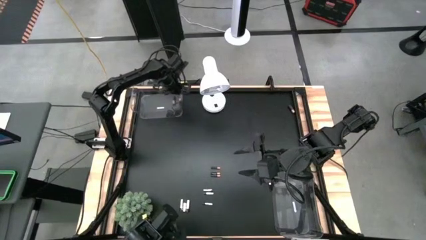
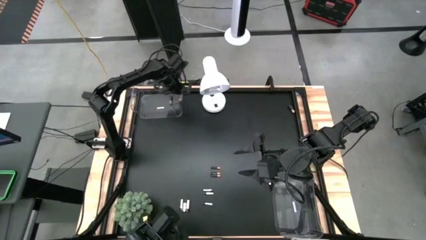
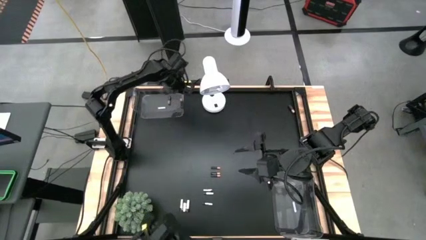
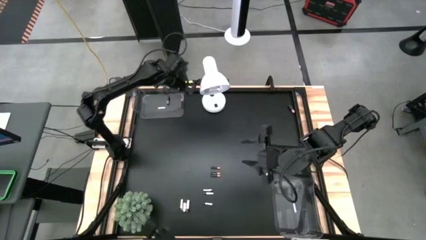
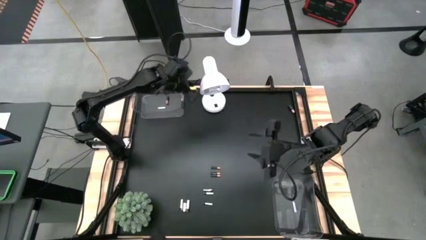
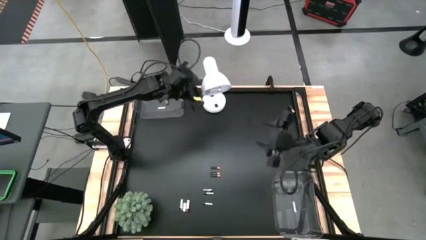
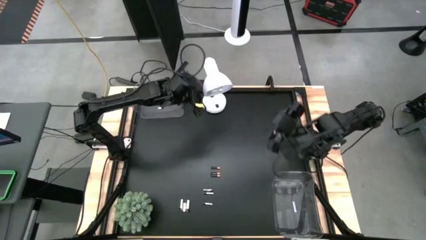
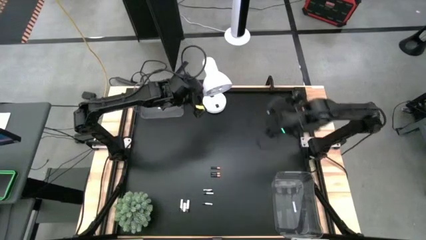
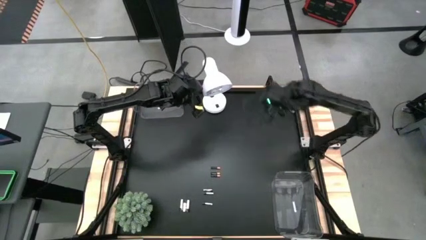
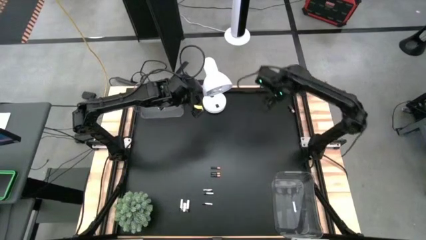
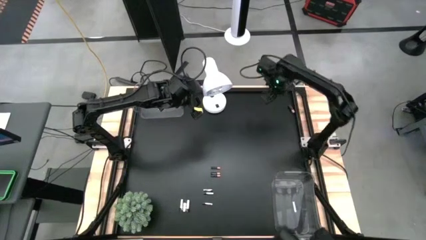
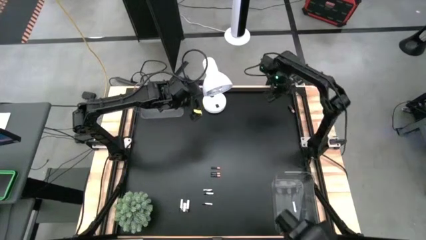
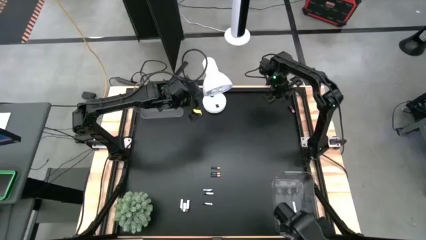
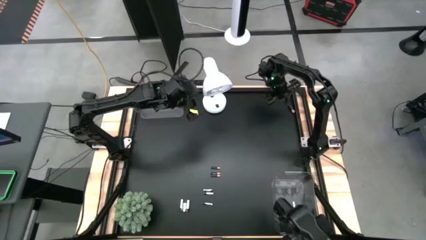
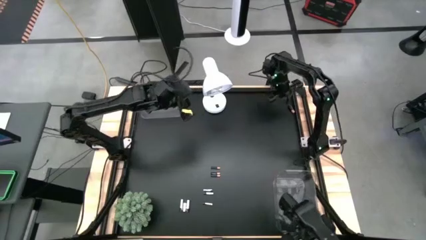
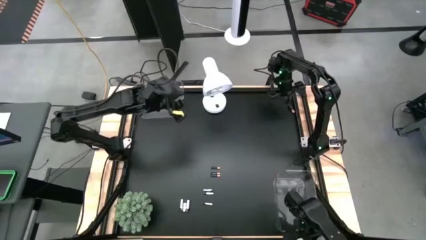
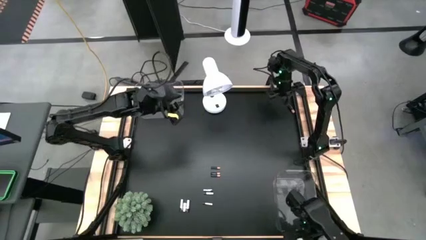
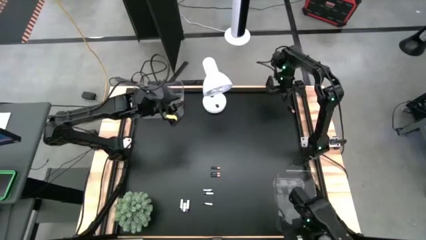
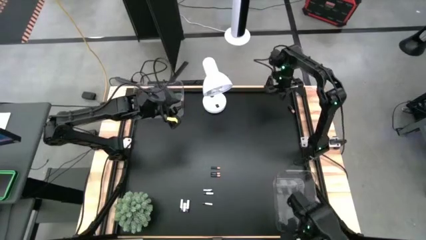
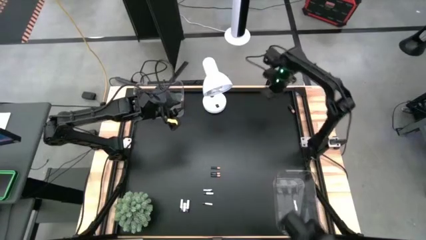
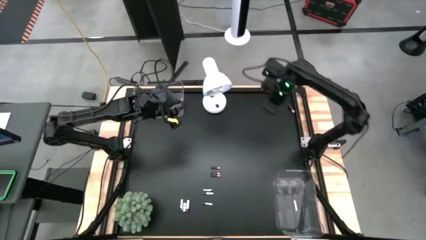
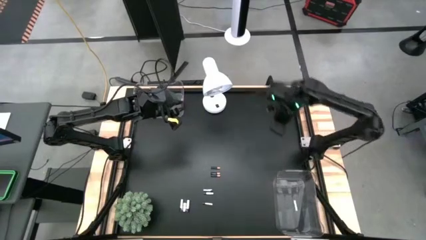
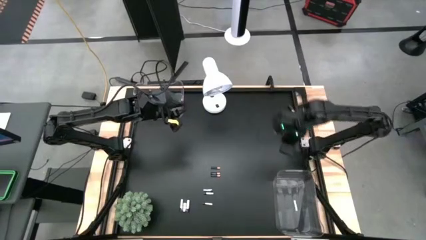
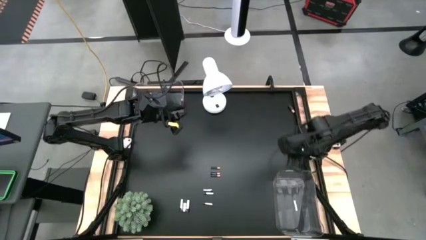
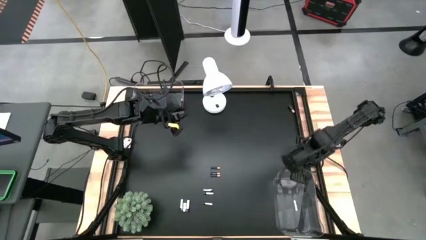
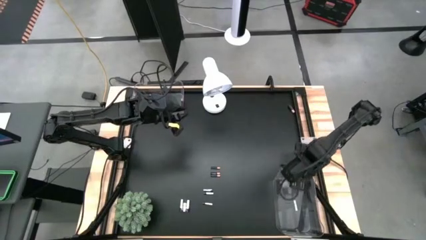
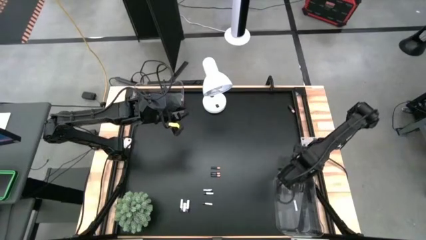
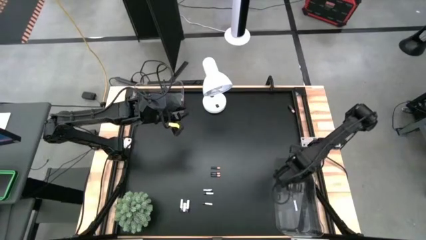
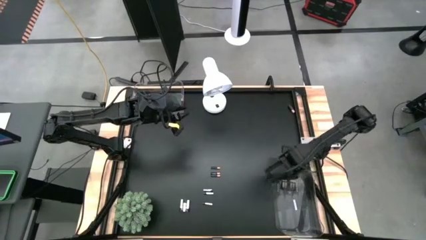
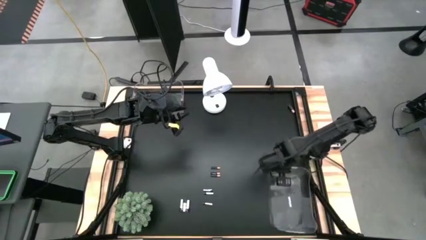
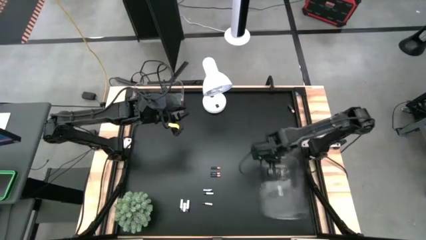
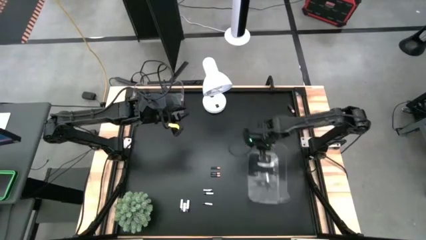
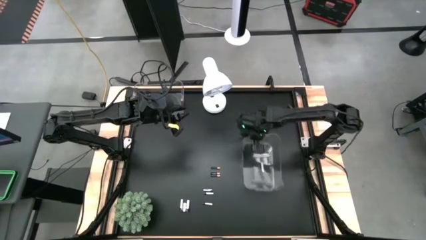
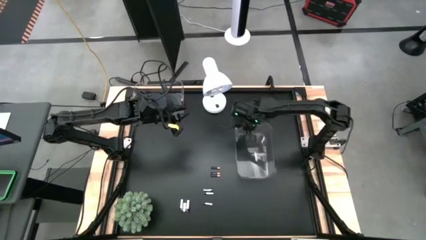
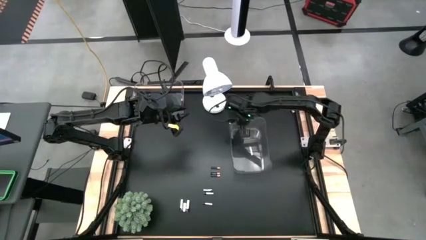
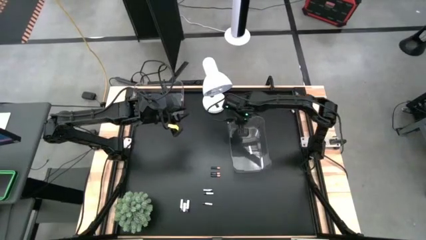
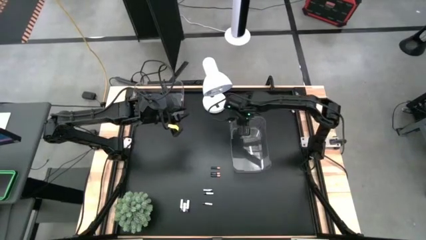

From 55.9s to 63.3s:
Task: Sort batteries
Move the transparent bin to the center of the table

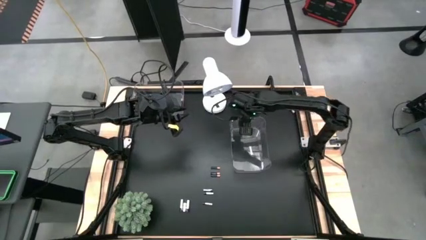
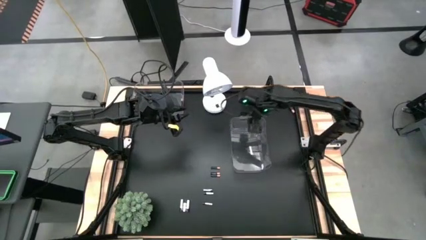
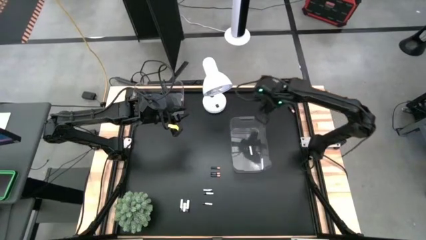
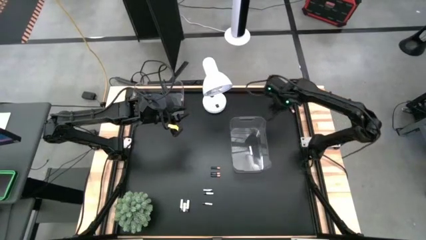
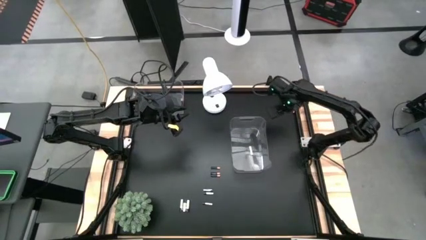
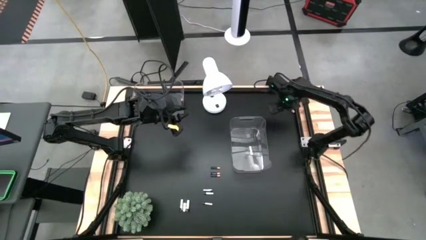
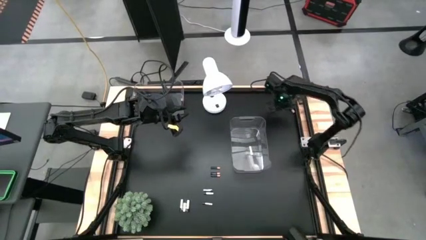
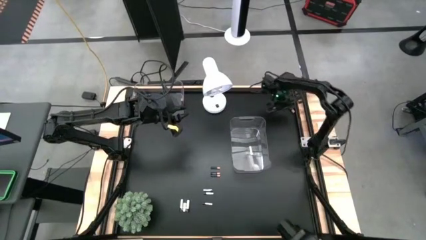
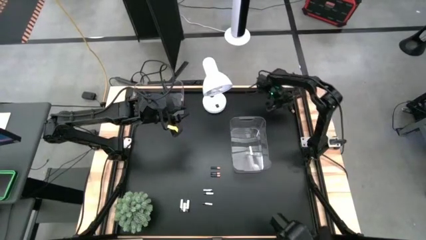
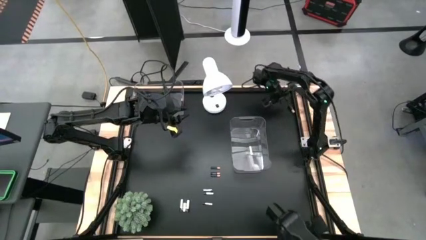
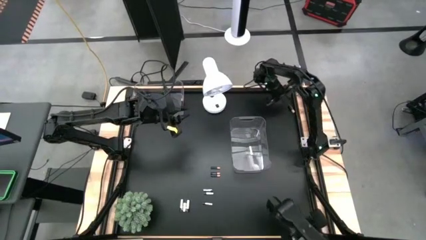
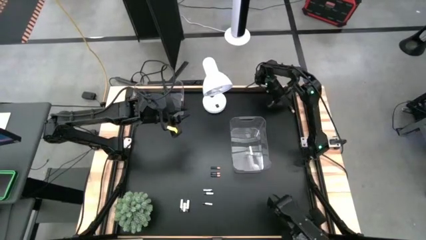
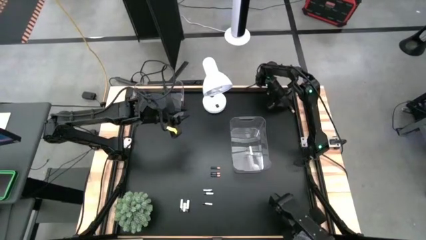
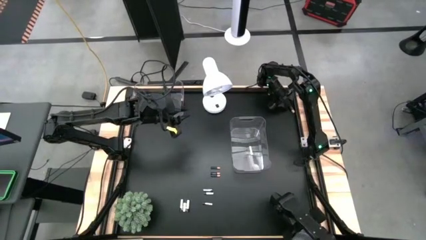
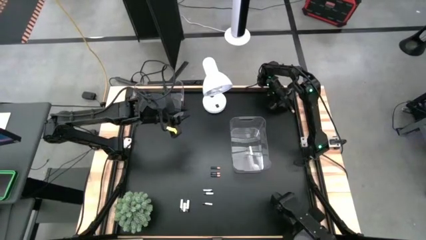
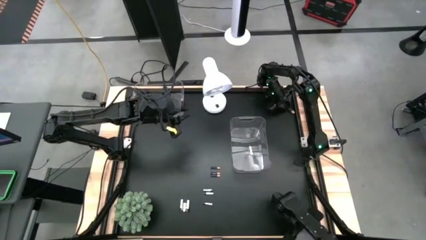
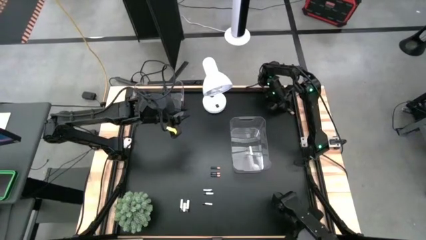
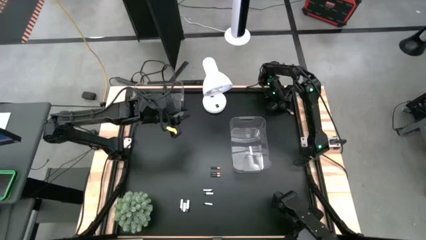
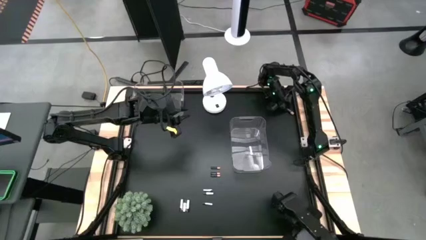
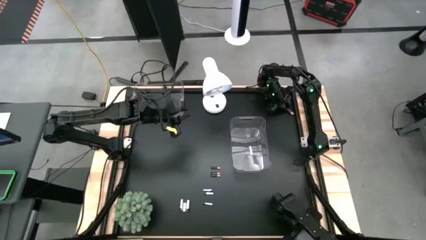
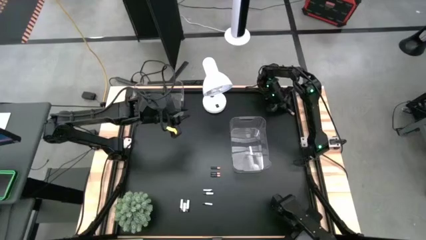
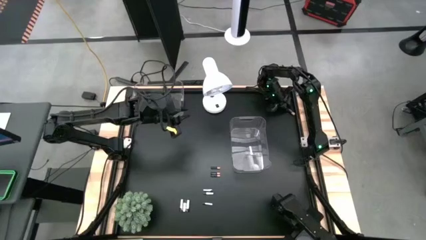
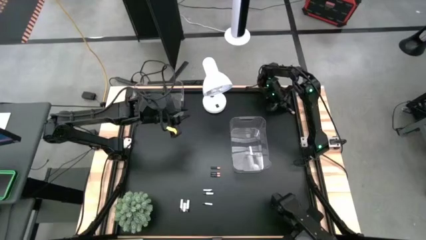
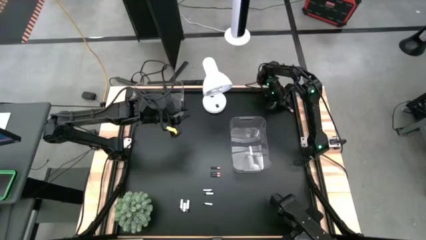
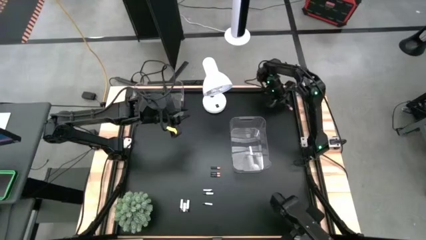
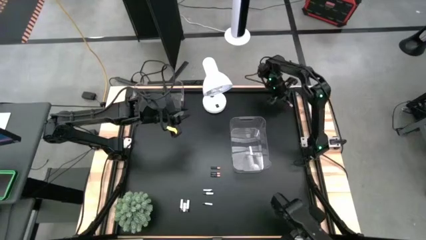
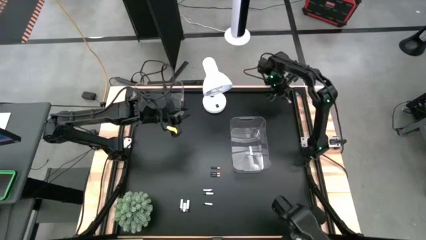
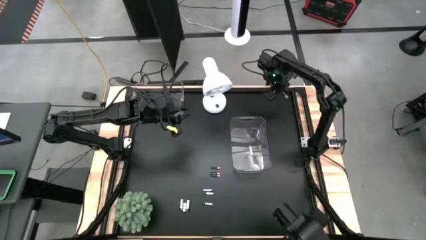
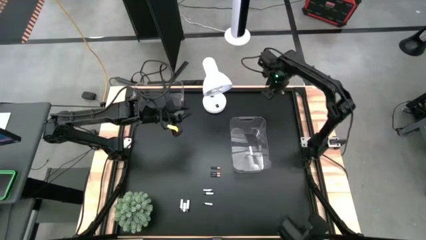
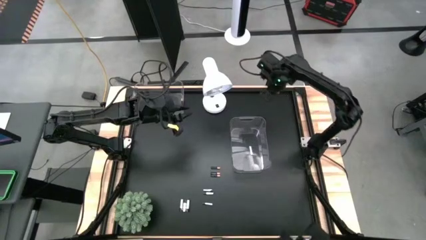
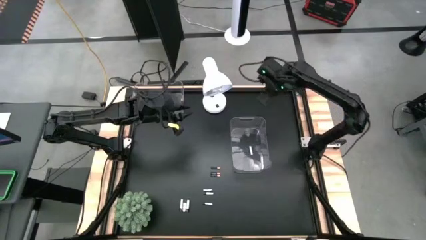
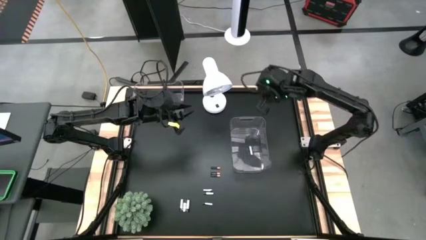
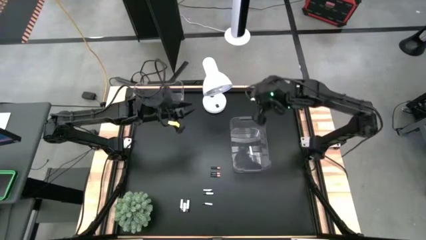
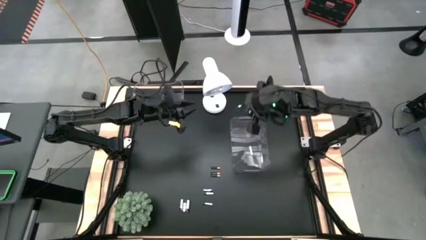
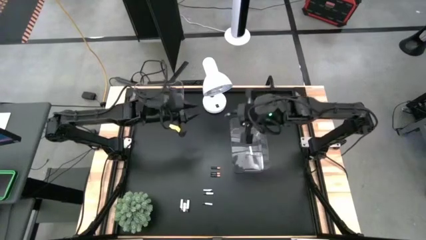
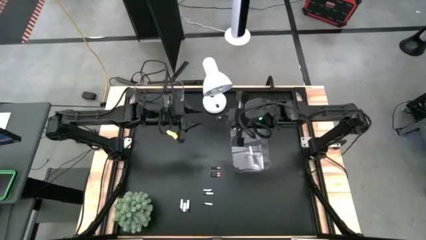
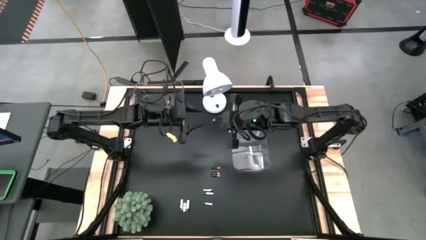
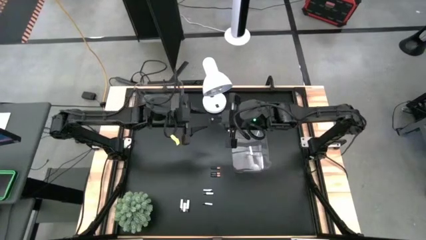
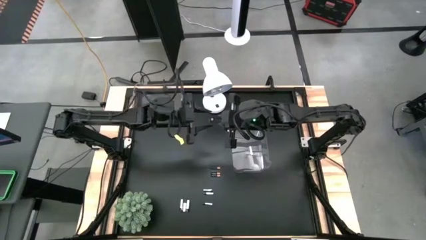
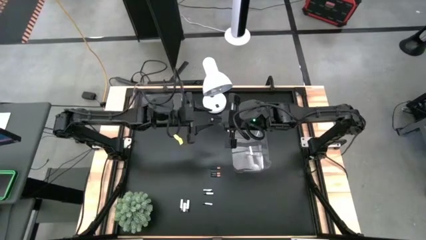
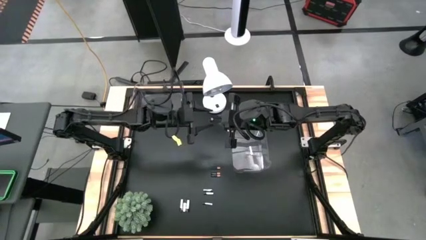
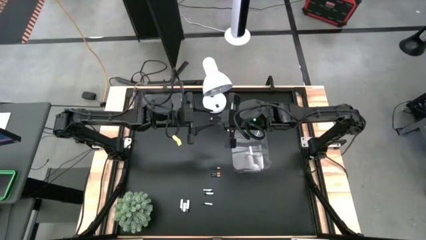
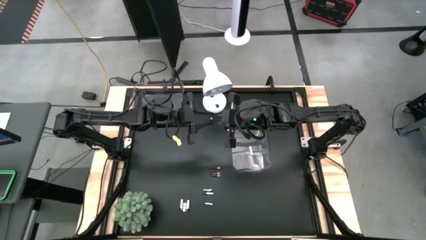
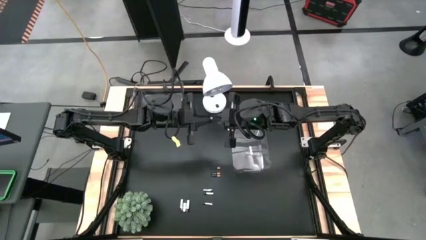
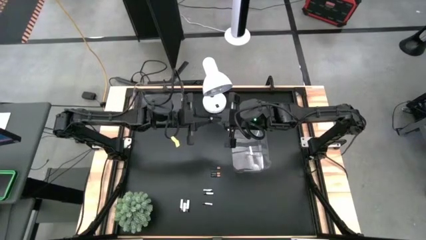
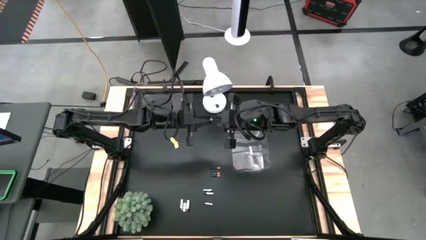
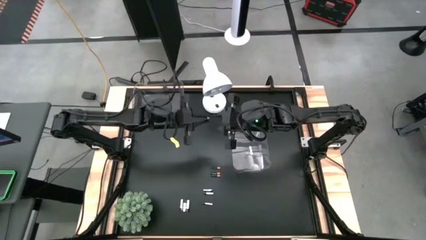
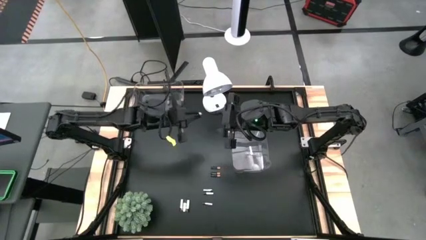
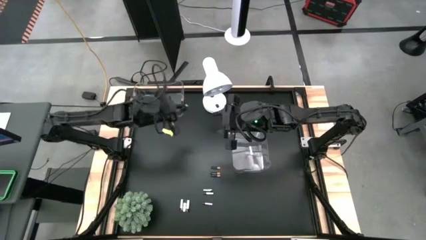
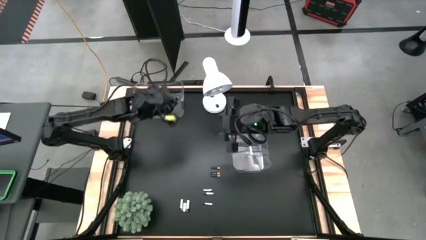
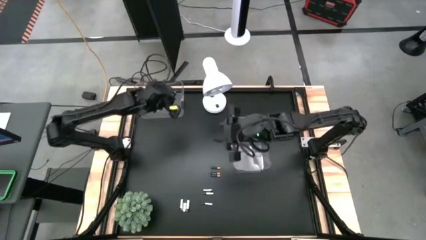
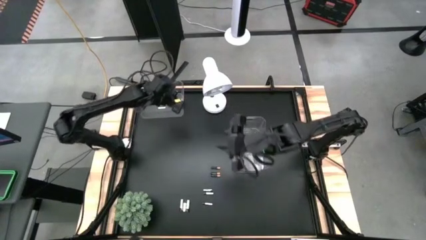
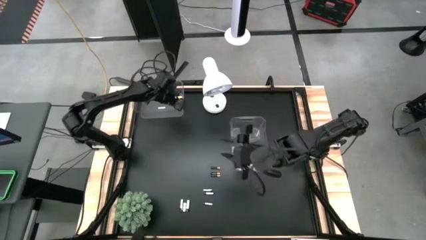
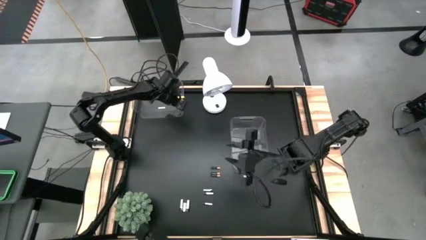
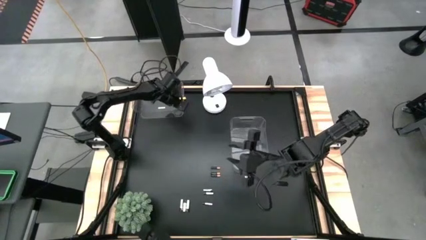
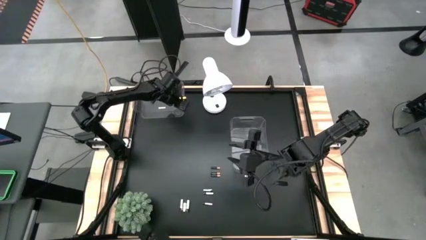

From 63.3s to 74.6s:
Put the black battery into the top transparent bin
